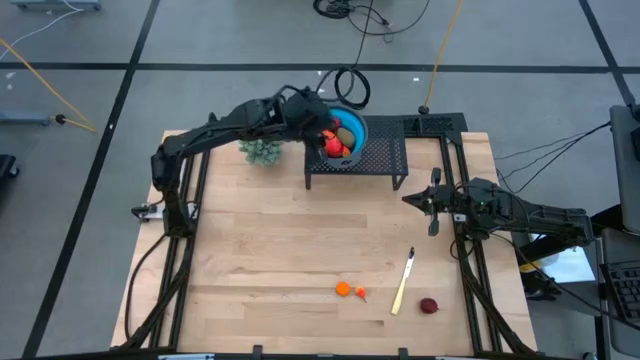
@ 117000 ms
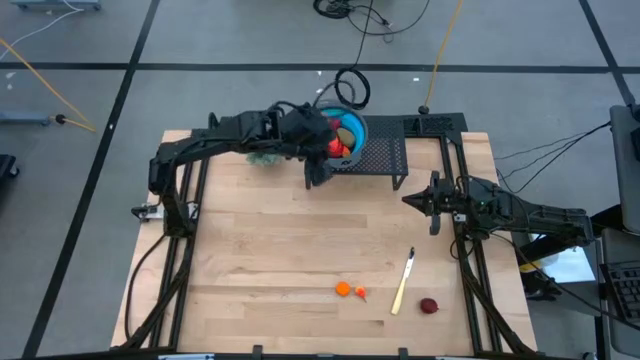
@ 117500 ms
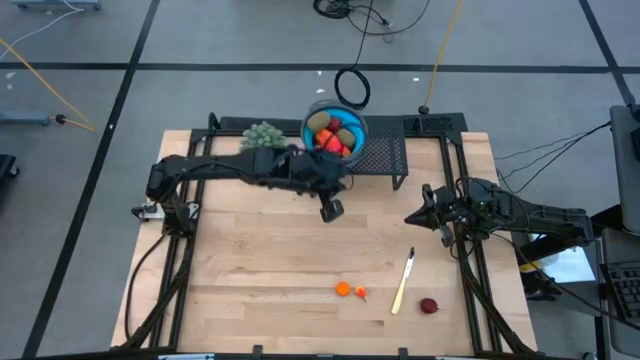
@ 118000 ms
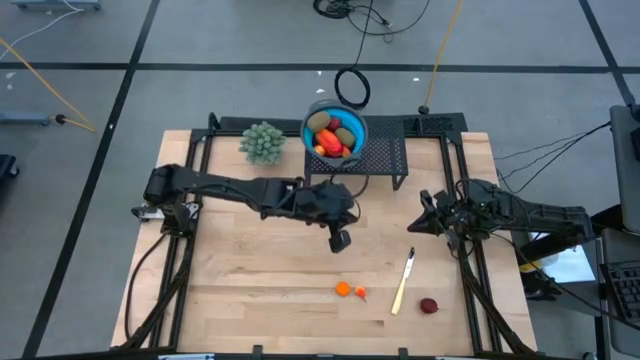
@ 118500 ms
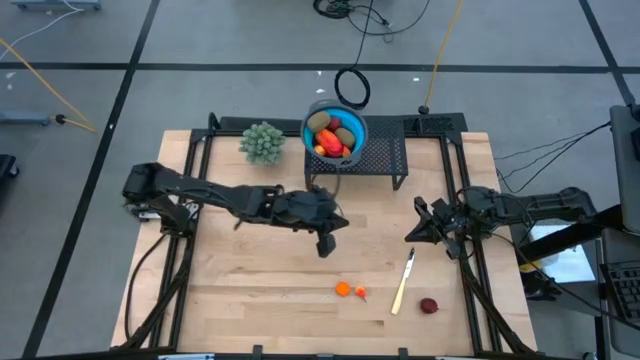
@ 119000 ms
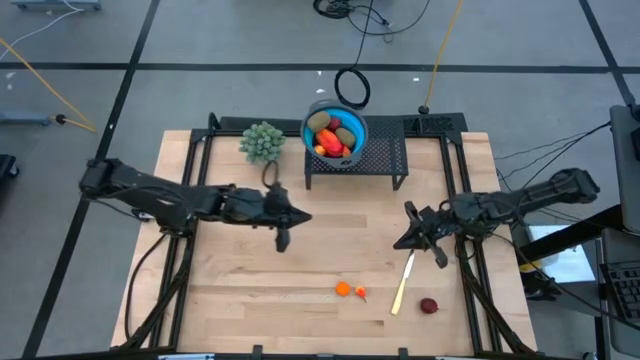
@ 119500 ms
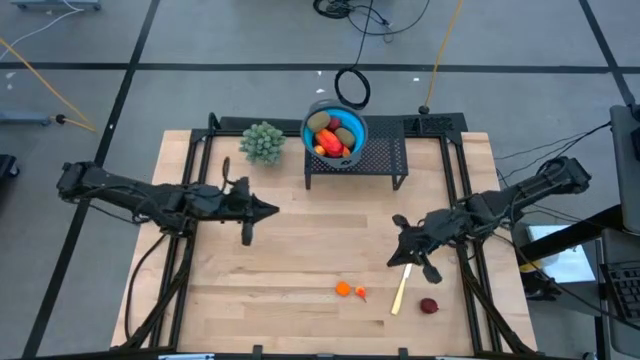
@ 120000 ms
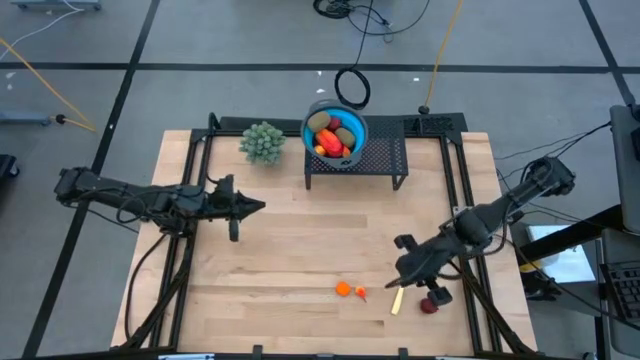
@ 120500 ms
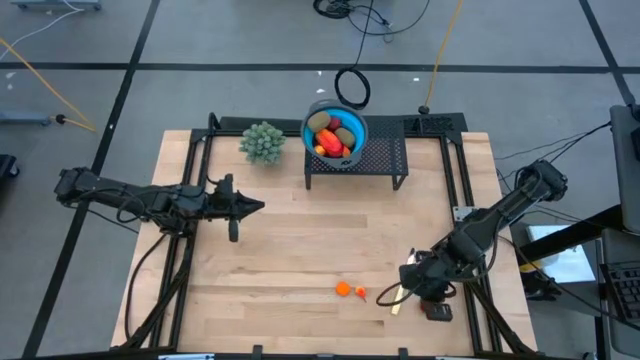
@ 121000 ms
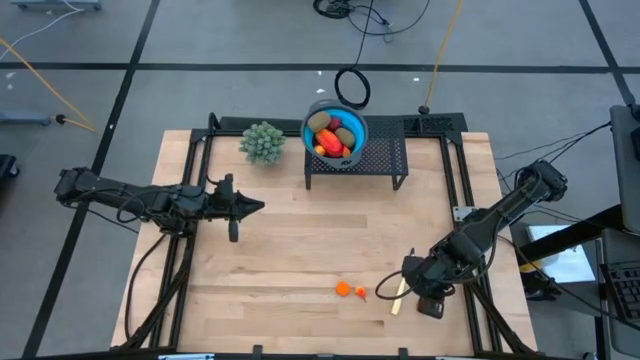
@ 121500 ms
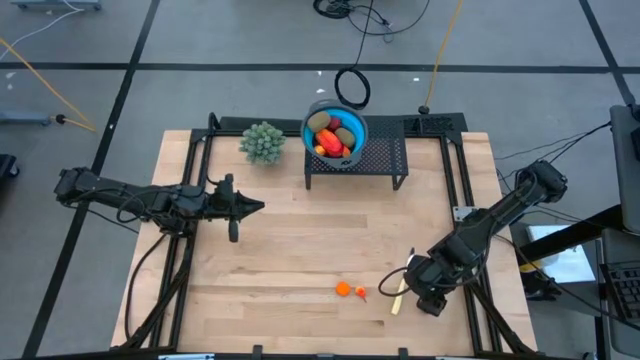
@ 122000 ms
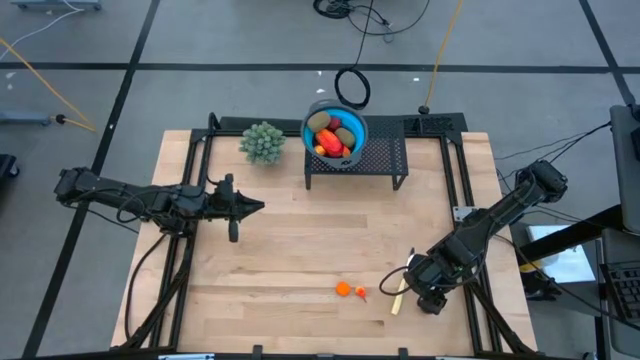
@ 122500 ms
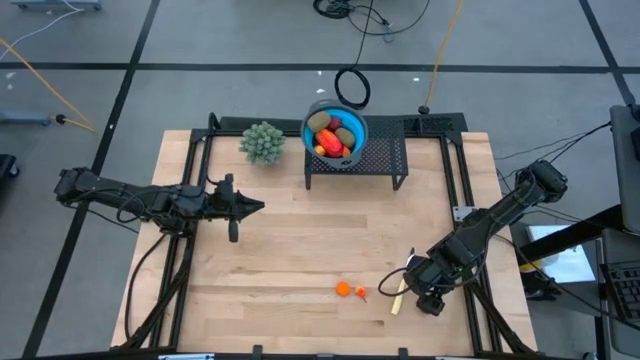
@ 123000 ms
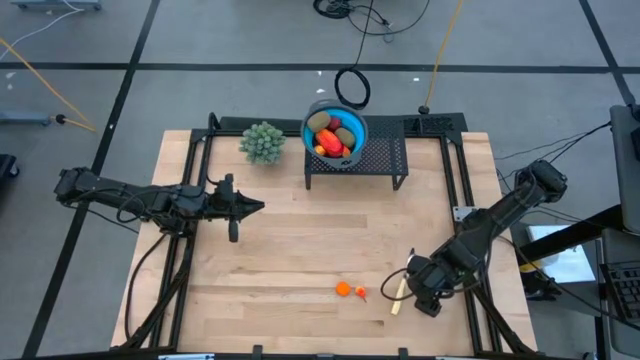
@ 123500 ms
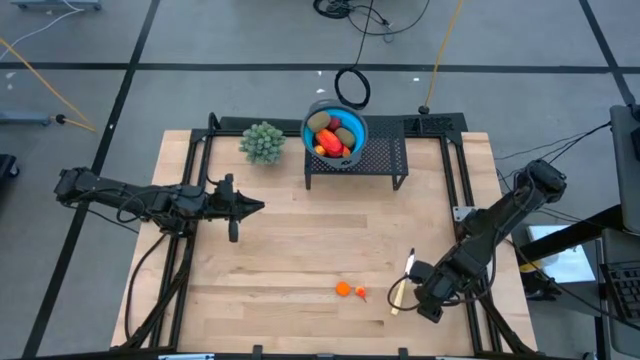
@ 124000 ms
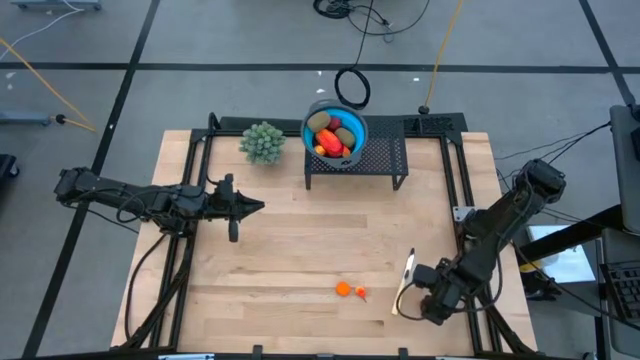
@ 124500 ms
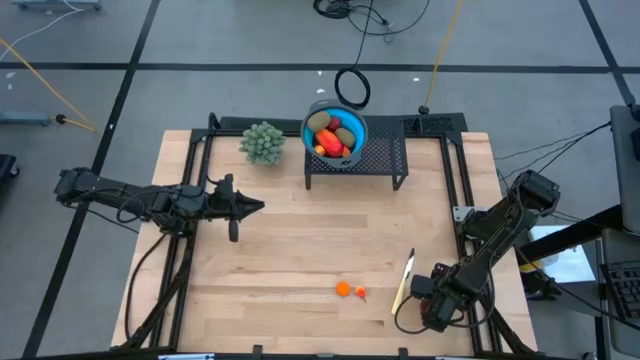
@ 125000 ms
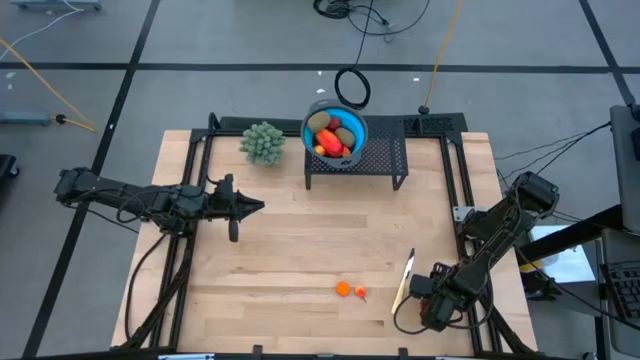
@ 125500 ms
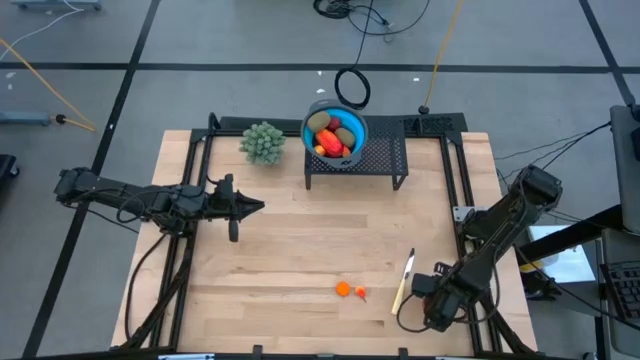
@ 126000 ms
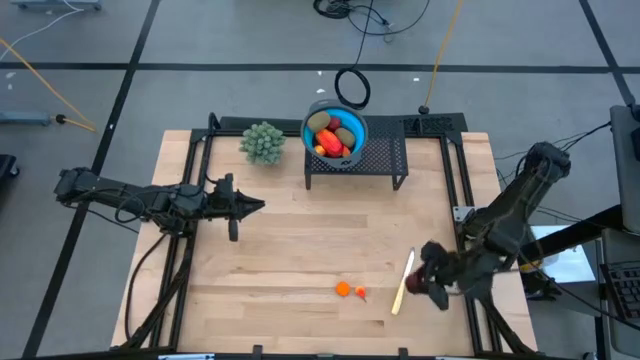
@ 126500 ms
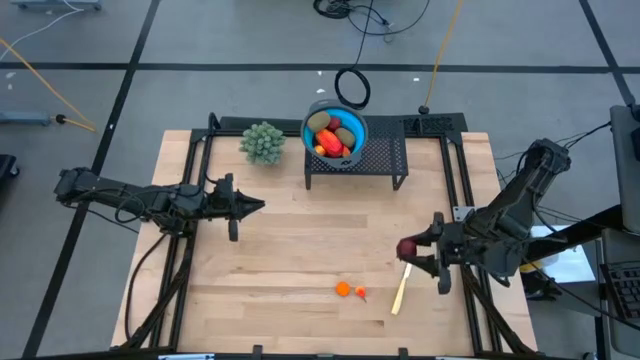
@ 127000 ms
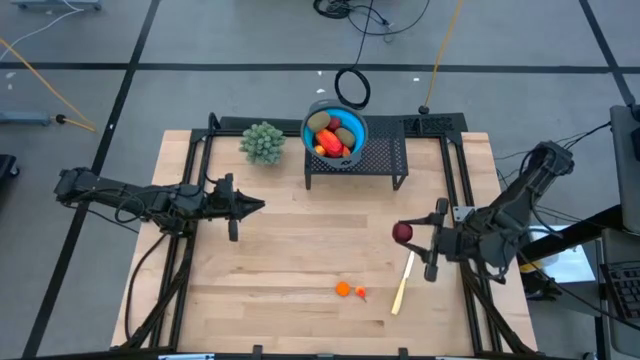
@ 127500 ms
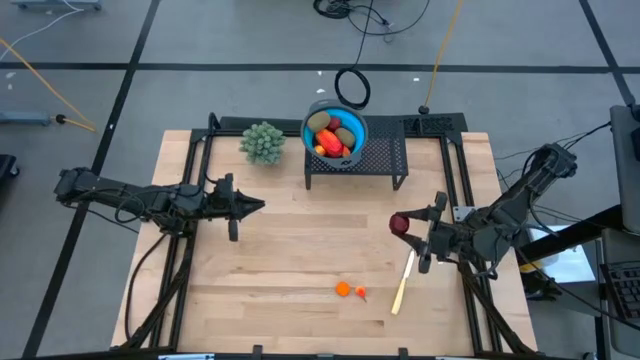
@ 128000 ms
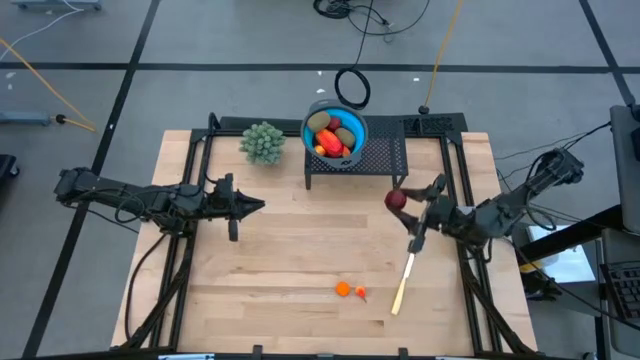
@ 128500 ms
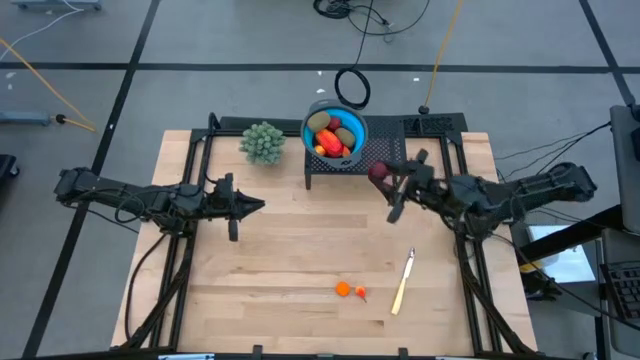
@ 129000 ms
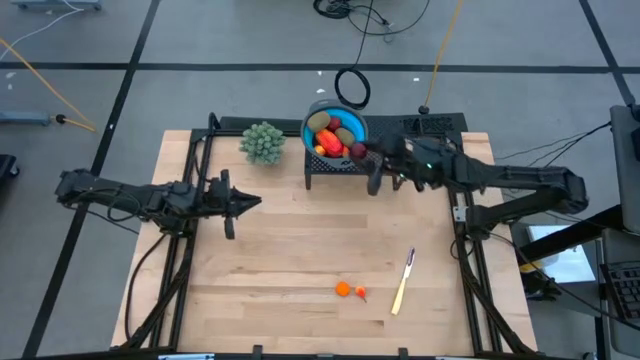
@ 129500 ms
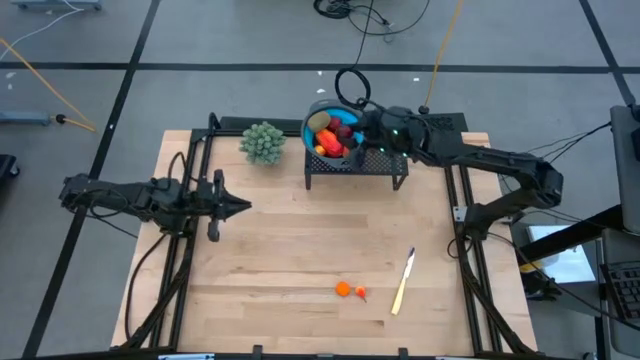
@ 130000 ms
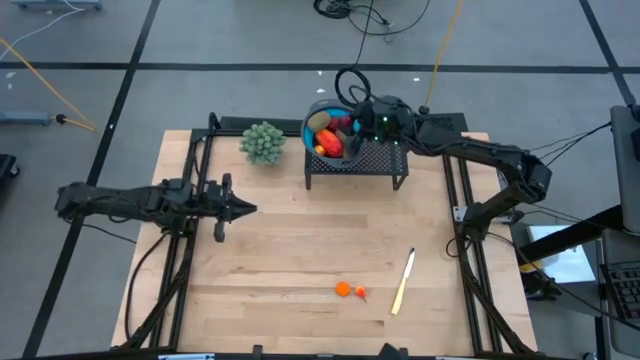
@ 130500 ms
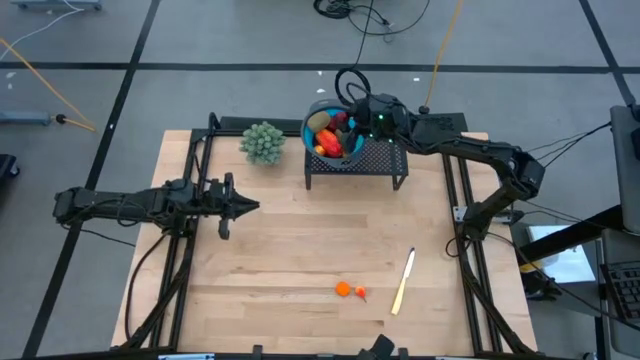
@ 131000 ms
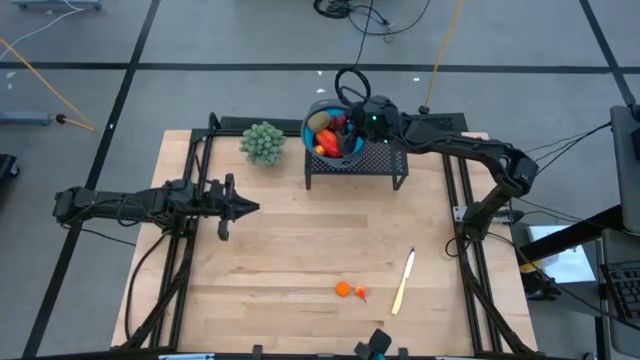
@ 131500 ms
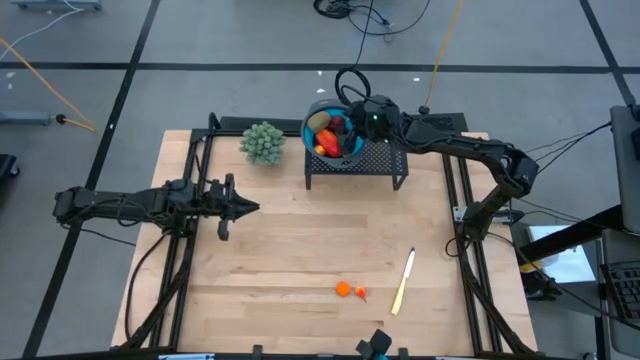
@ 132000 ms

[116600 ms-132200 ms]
Task: Pick & Place Fruit
Put the pomegranate into the blue strainer on the shelf

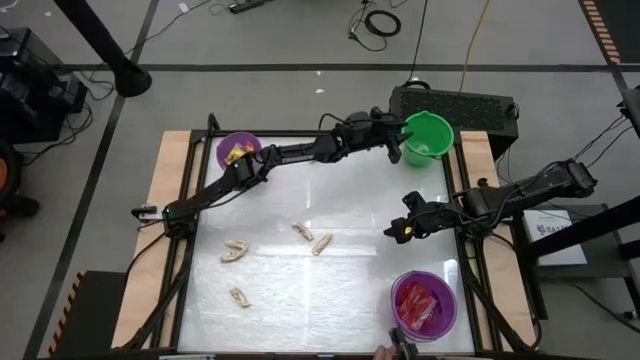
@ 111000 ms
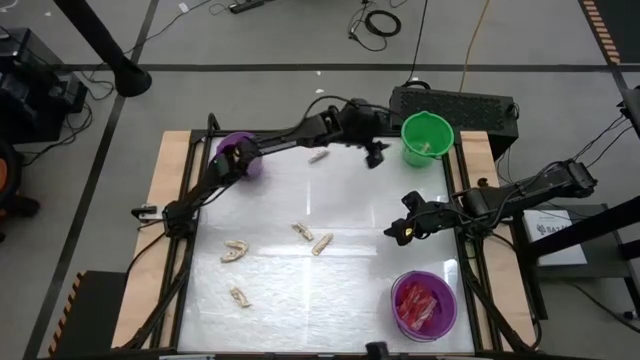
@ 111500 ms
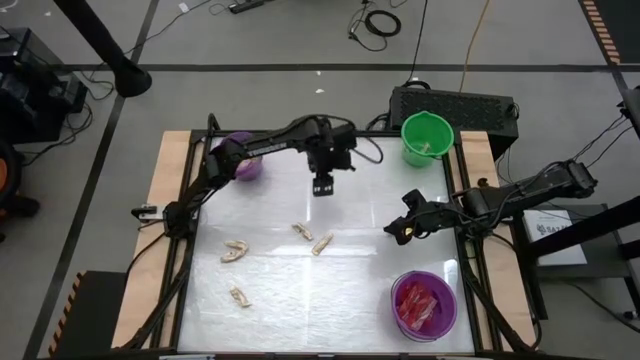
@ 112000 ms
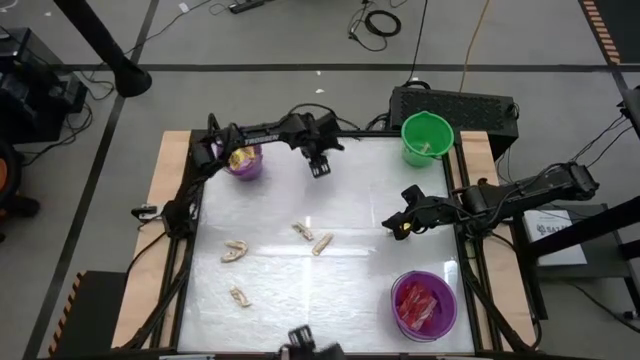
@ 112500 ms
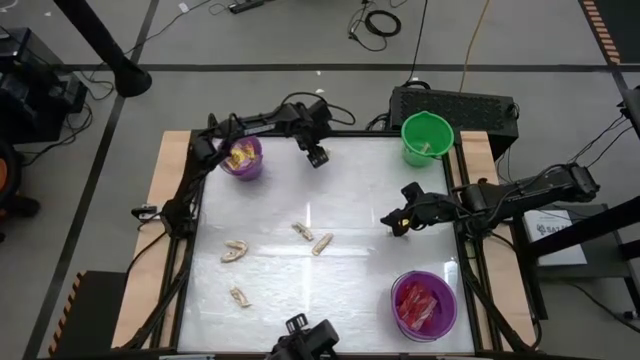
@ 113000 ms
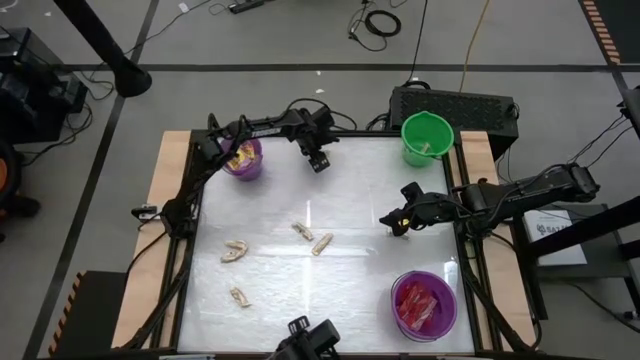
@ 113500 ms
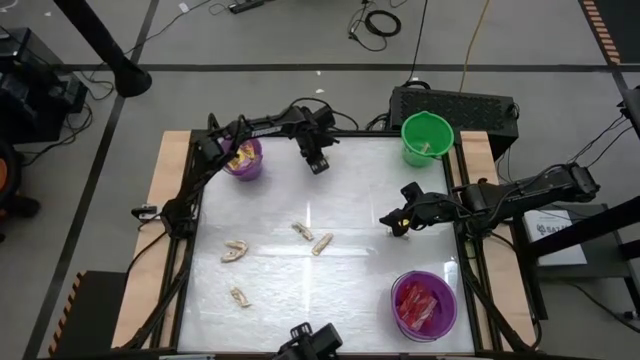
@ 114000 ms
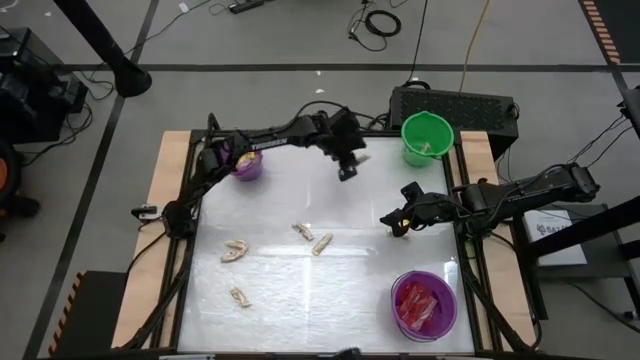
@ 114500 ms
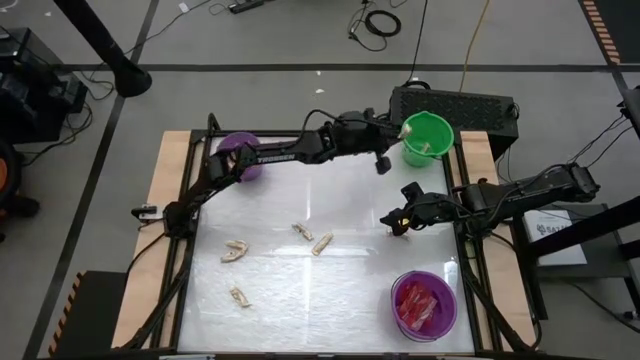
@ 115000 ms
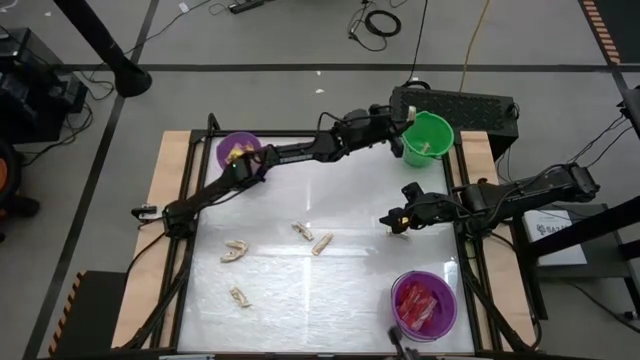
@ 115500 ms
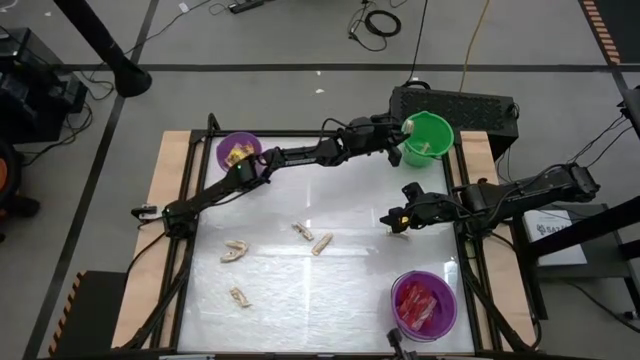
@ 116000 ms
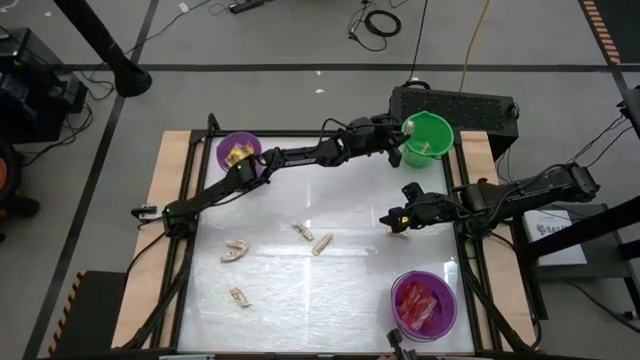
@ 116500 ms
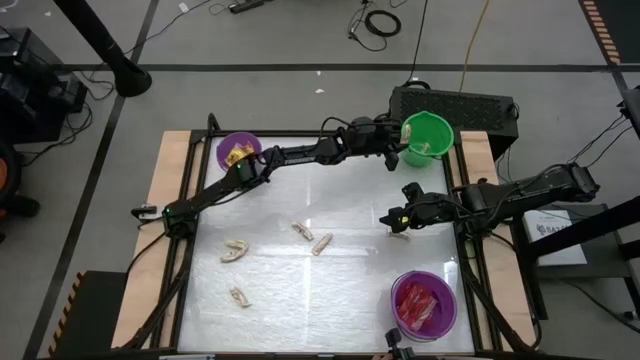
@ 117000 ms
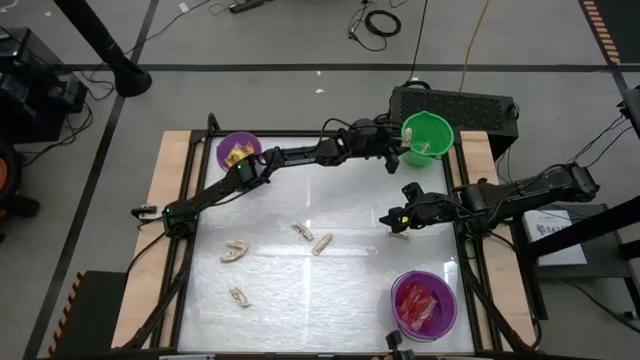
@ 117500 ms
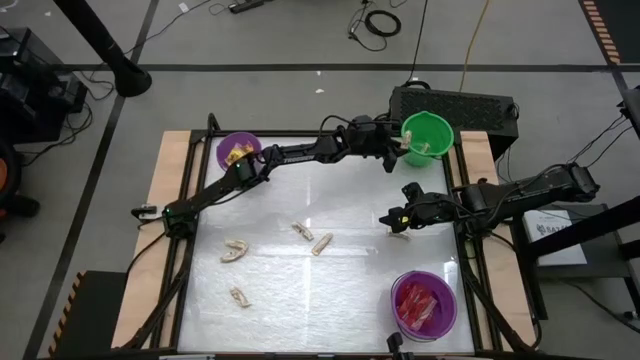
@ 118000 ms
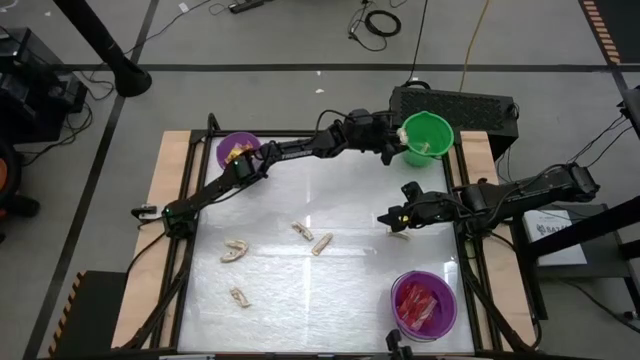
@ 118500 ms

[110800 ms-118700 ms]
Task: Sort candy by brand, put in halloween buckets
Put the white candy into the green bucket
